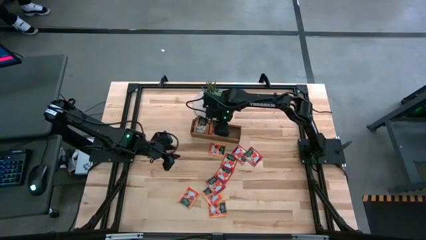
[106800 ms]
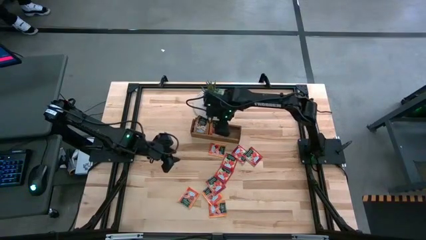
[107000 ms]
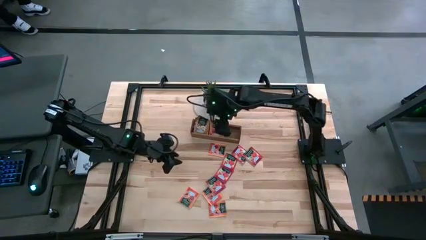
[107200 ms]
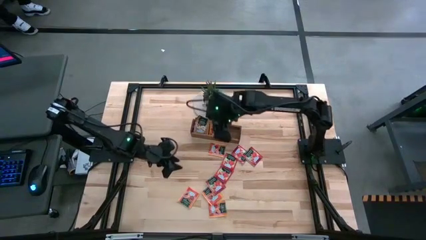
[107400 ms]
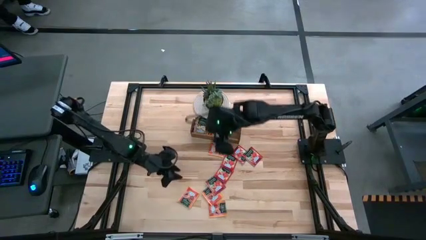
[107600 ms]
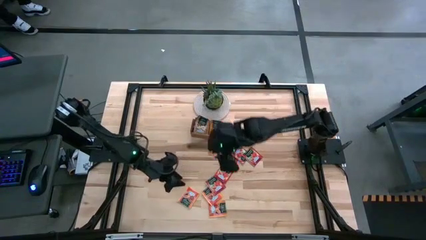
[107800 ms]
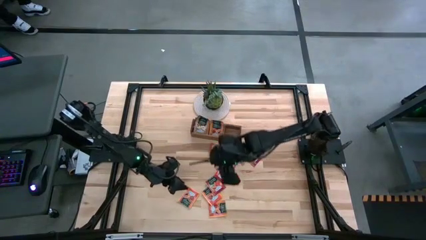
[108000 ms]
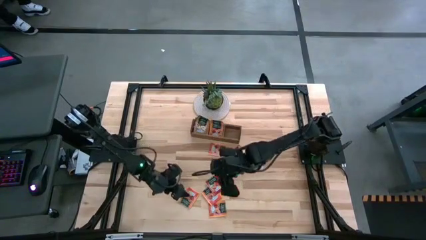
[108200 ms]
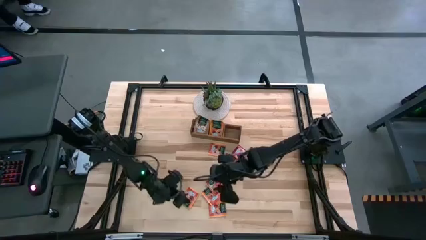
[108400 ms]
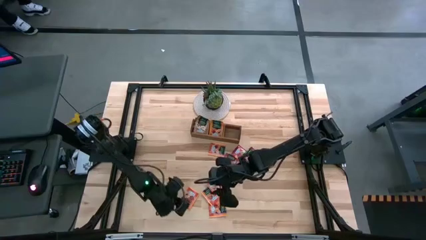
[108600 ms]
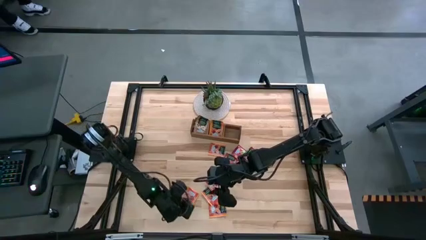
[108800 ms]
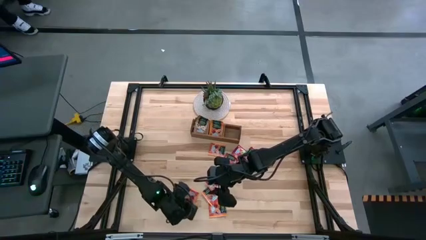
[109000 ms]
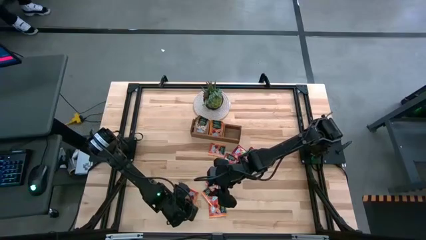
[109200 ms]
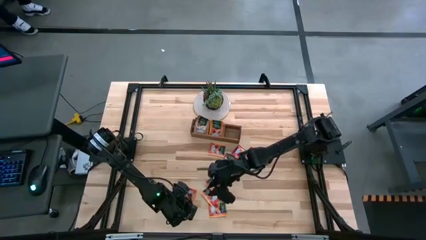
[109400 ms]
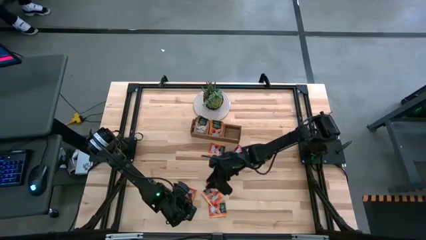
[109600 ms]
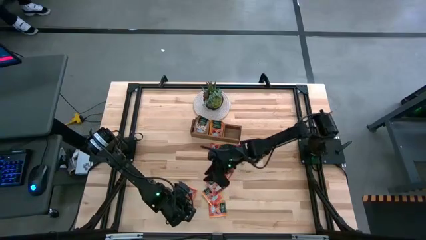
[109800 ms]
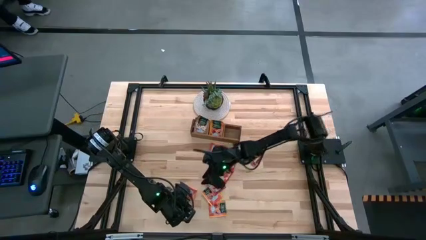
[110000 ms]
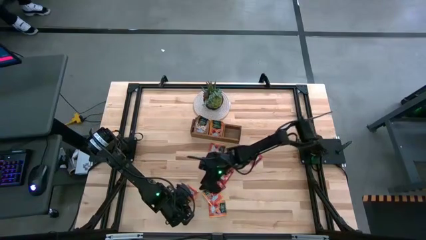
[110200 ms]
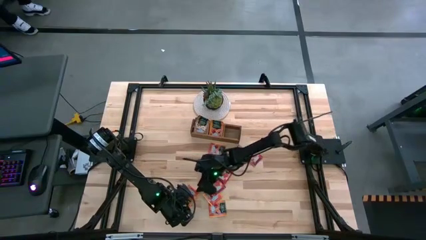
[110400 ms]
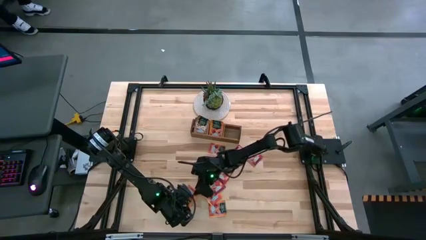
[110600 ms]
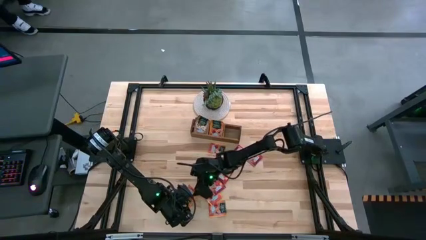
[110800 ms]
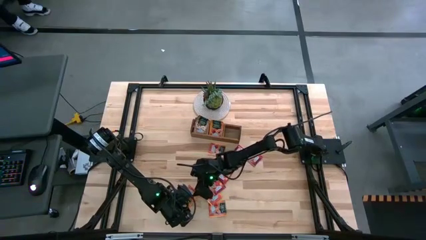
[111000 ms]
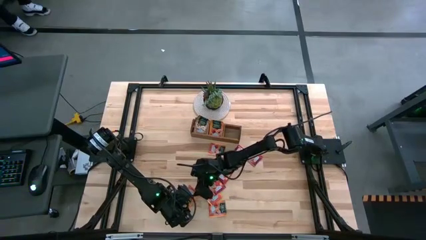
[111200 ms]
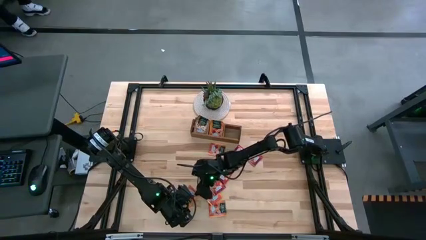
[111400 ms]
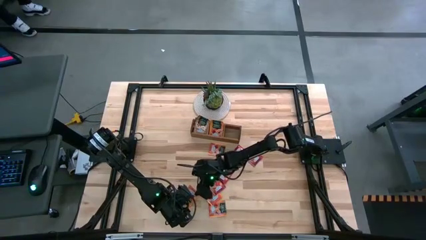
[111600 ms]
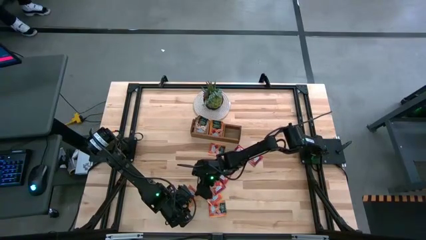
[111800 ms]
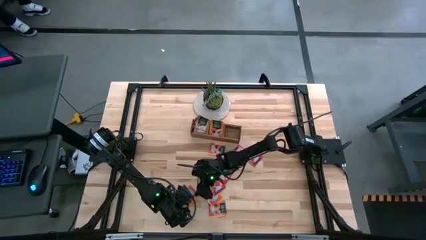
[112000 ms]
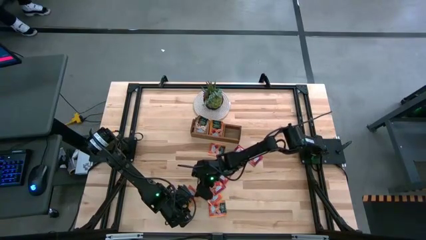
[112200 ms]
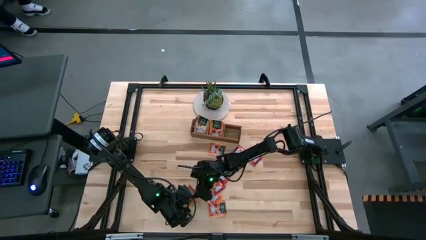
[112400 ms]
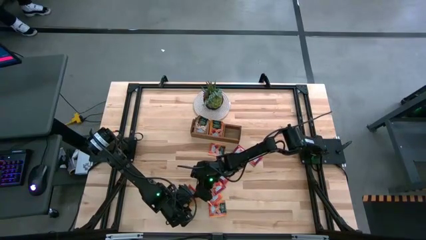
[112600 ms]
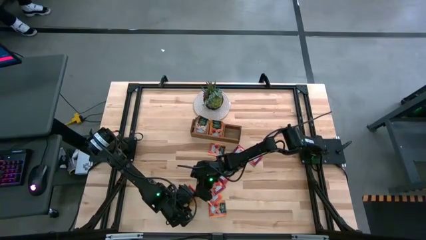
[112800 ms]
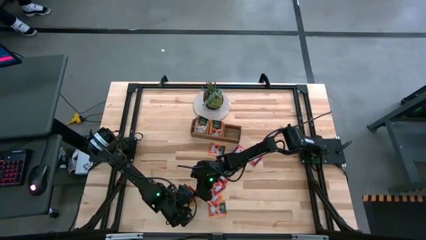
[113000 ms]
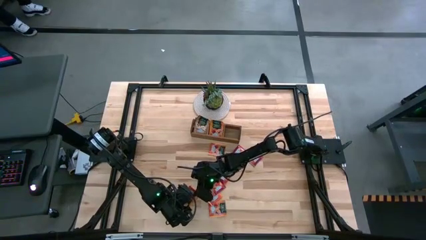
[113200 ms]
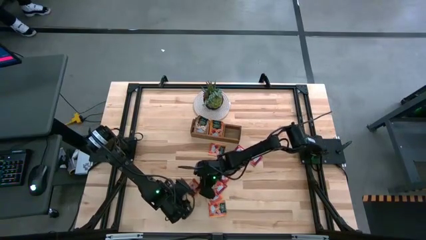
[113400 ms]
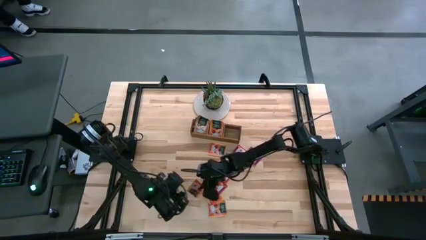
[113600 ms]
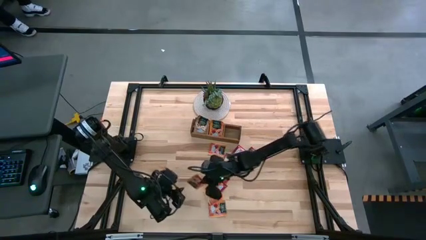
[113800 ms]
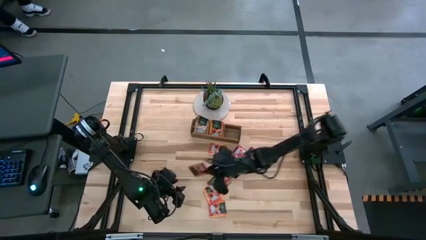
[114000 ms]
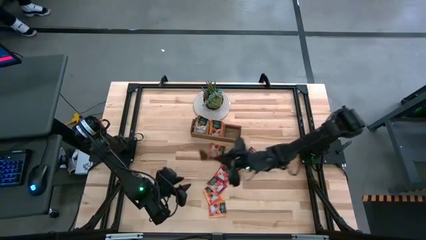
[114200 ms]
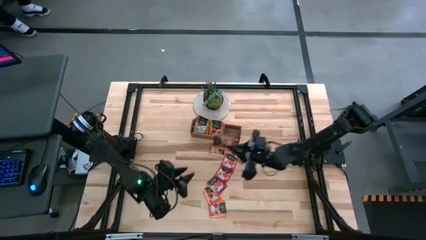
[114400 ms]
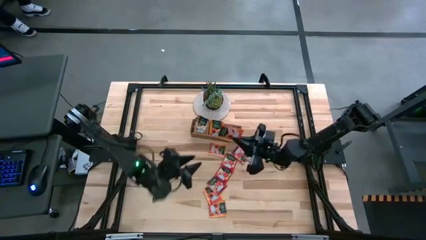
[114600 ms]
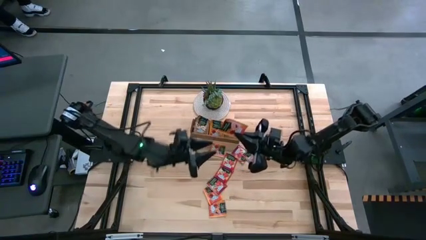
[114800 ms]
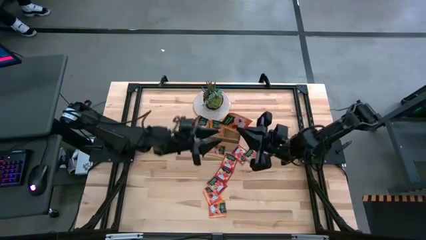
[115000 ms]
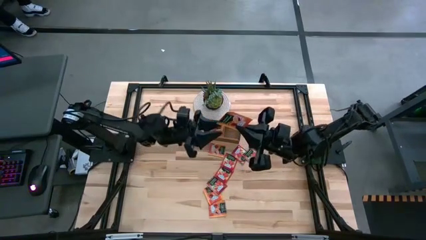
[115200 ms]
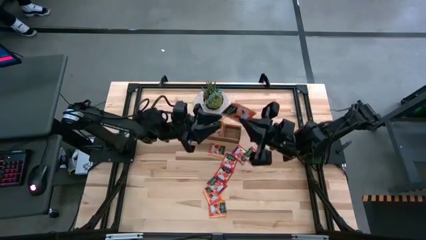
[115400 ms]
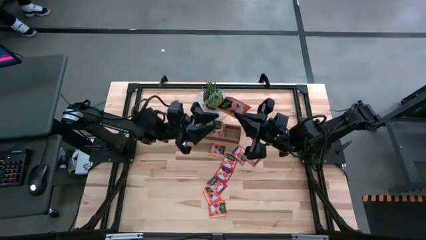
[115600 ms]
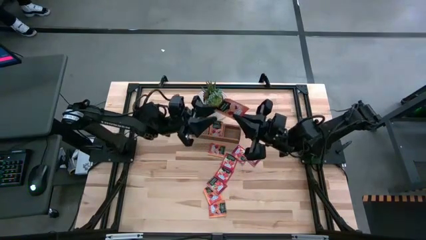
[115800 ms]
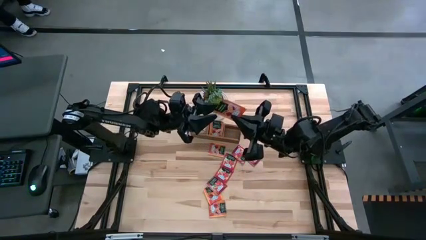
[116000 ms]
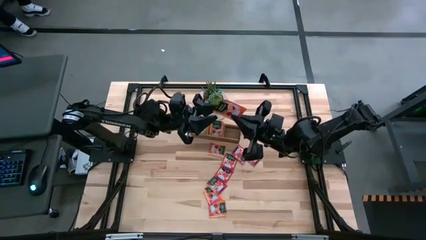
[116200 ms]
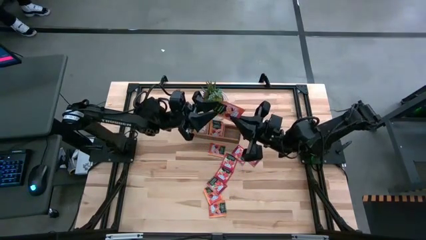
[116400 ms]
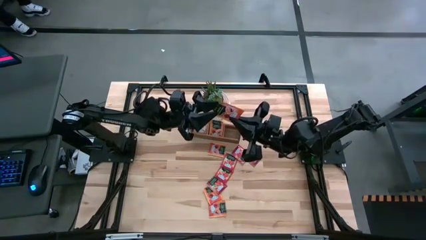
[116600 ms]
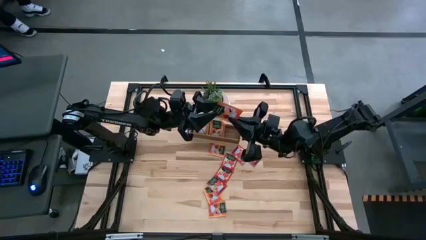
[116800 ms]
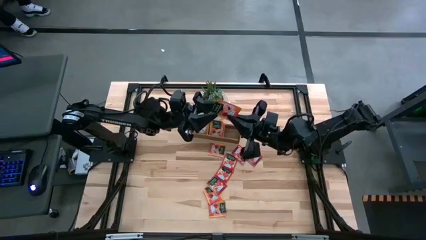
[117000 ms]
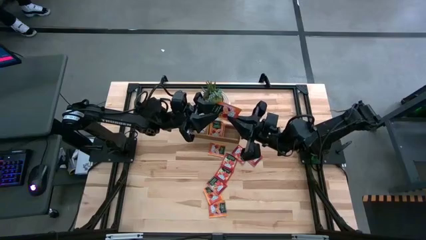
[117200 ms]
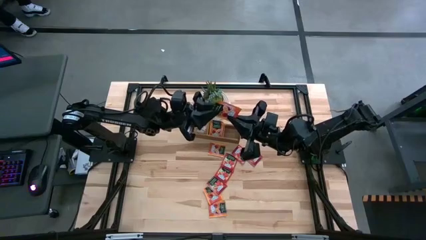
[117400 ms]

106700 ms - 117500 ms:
Task: Pick & Place Tea
Put the orange tea bag into the middle section of the wooden organizer

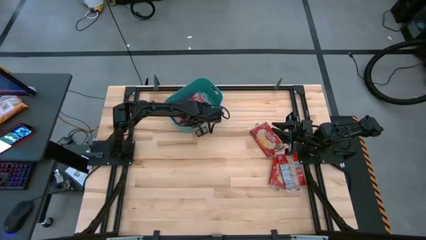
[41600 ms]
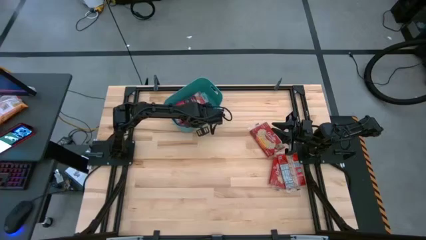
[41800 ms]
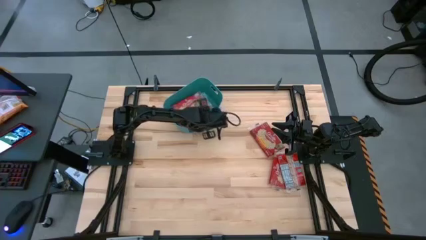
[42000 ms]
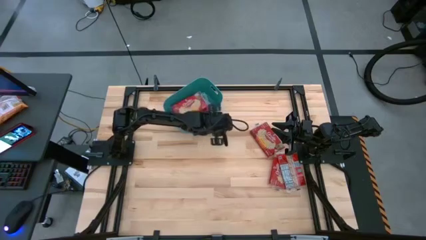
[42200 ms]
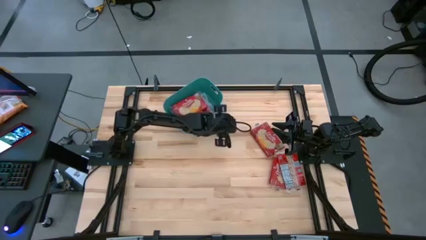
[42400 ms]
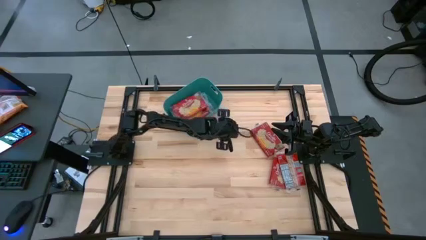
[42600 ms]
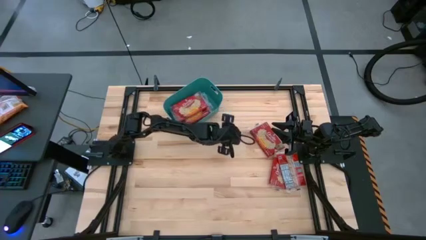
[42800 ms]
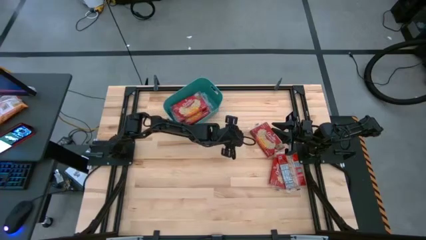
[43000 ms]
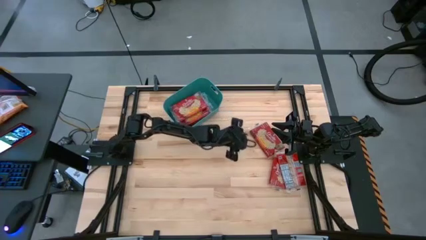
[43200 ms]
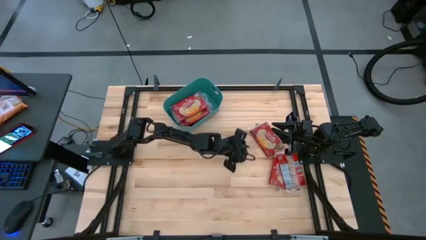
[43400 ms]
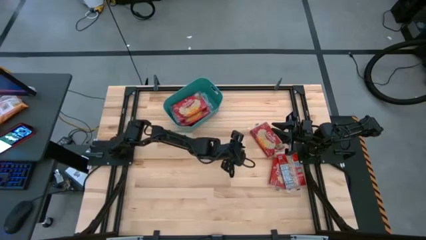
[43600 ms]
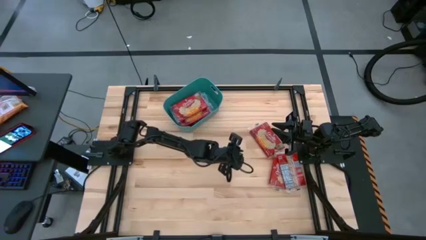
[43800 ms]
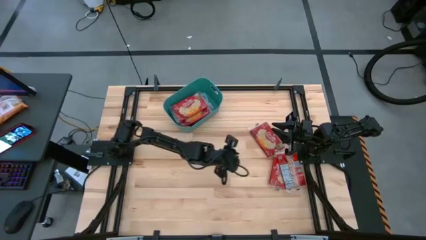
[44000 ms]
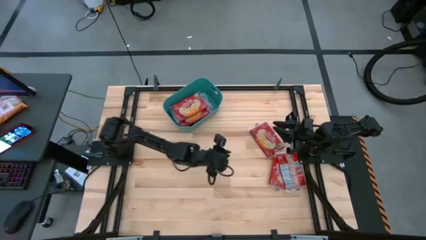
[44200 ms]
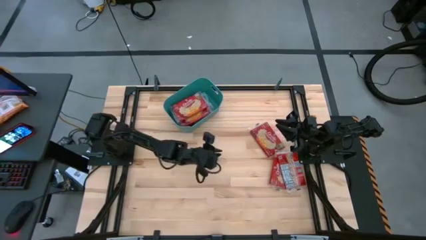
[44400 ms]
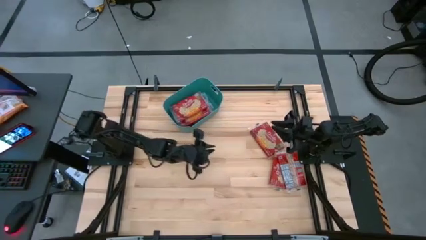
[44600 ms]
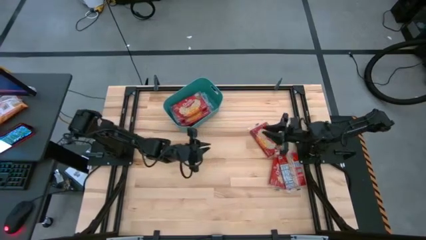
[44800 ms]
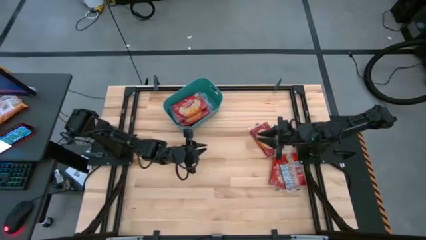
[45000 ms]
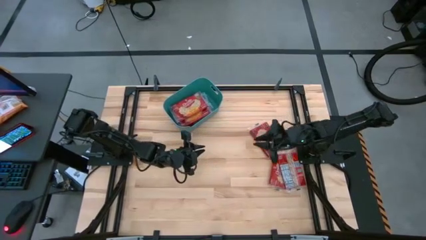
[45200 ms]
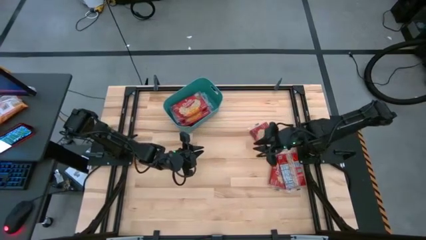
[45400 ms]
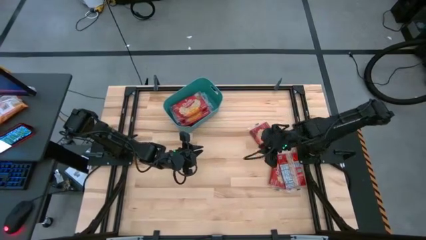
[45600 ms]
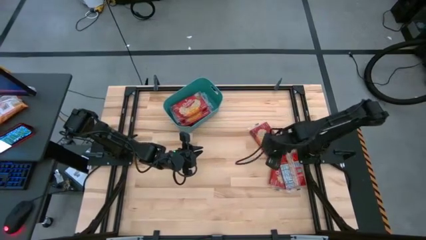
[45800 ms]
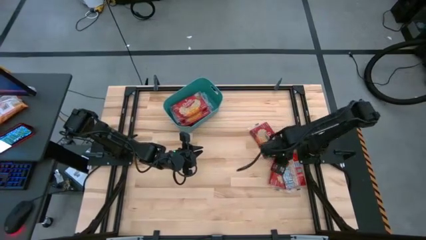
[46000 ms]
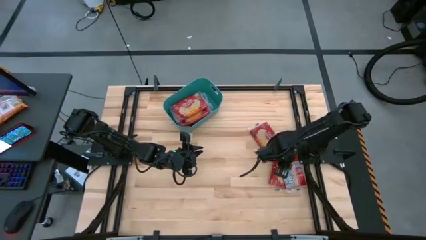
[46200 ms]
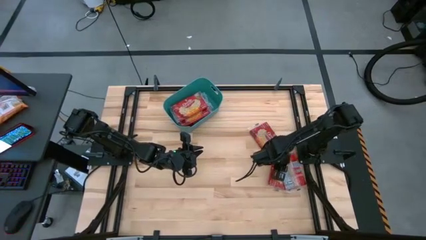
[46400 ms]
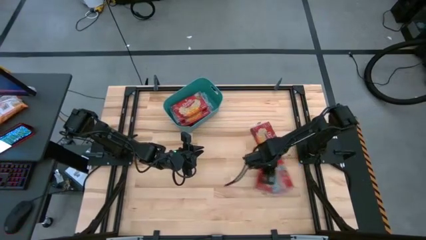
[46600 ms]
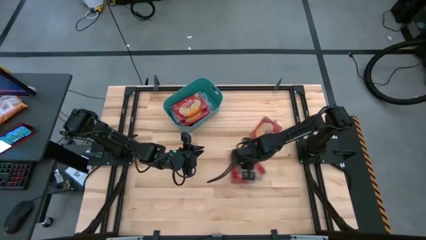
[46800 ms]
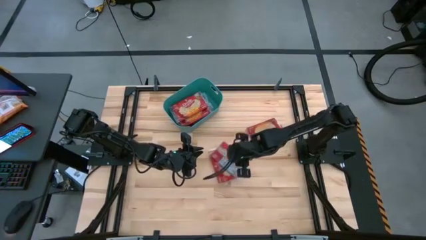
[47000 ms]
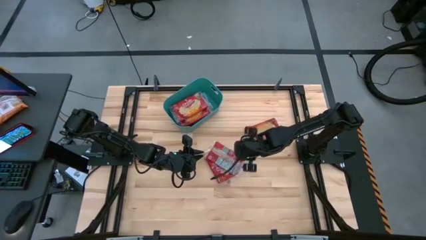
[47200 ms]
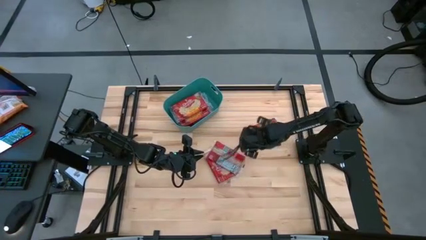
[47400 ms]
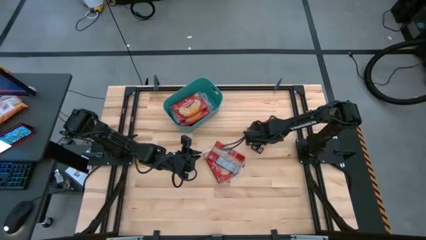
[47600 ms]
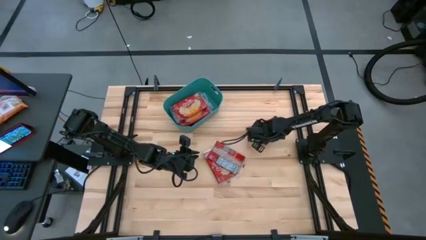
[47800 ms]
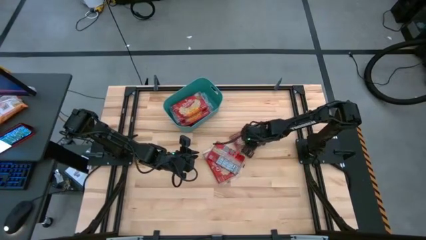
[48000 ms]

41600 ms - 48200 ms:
Task: Sort popcorn bags into baskets
Move the red popcorn bags to the center of the table
